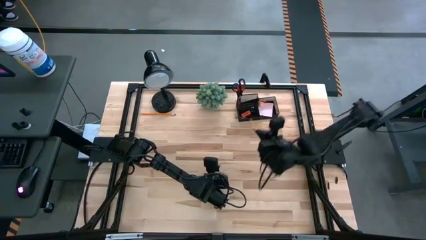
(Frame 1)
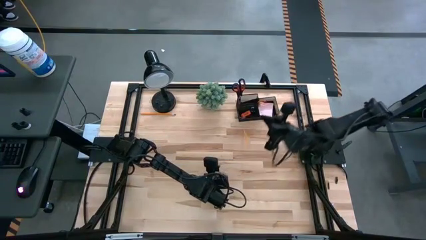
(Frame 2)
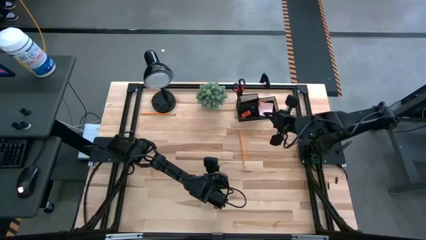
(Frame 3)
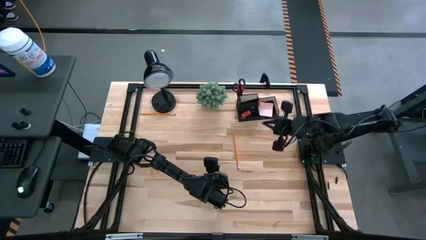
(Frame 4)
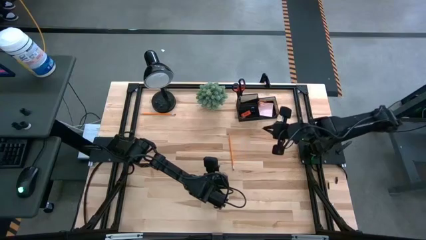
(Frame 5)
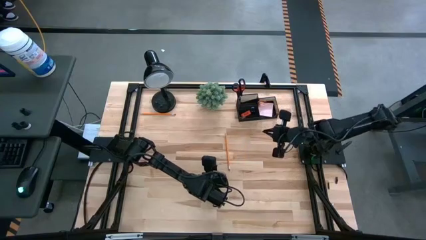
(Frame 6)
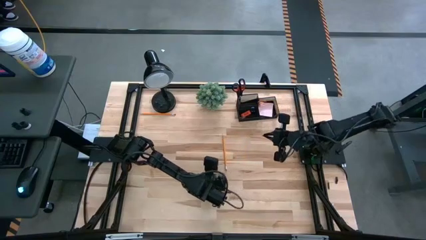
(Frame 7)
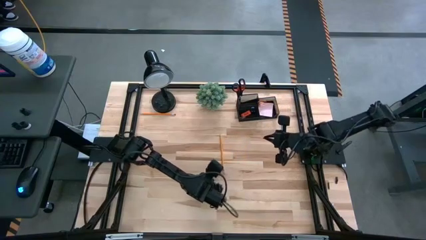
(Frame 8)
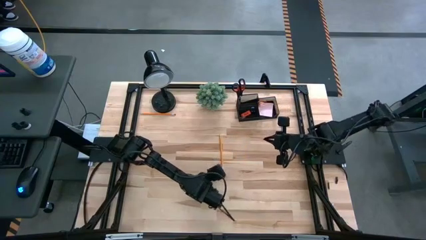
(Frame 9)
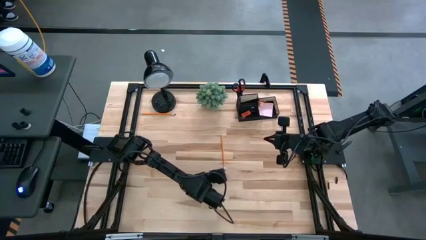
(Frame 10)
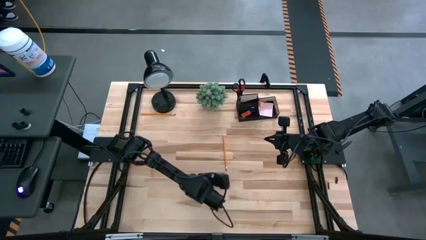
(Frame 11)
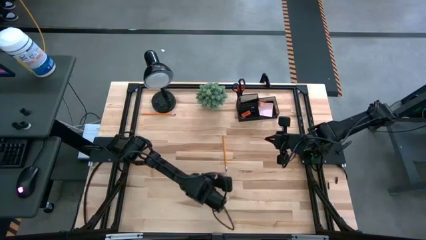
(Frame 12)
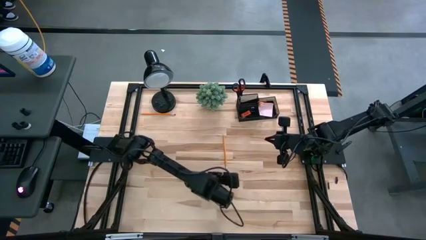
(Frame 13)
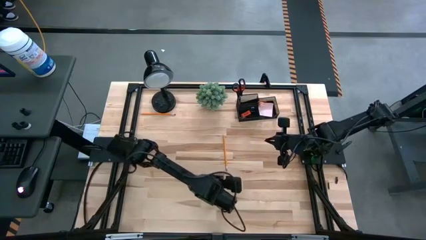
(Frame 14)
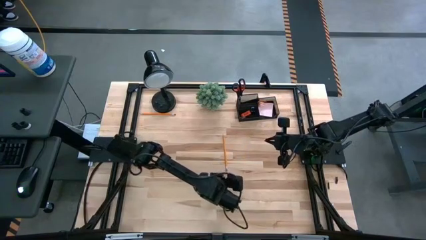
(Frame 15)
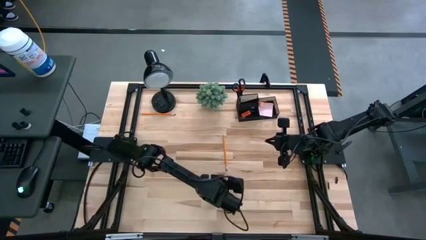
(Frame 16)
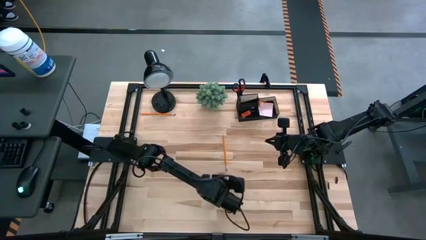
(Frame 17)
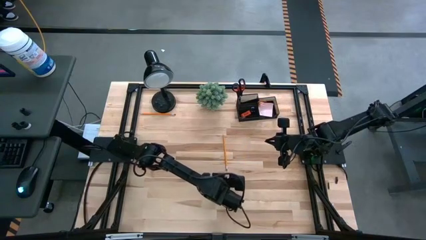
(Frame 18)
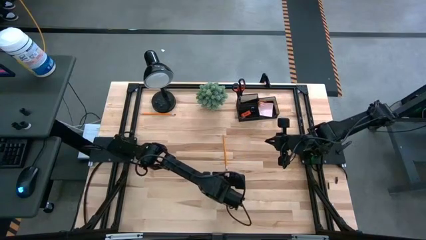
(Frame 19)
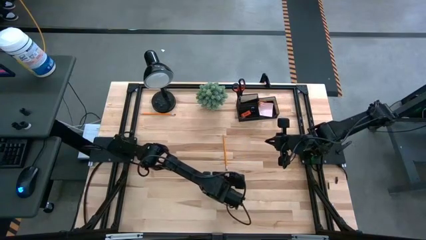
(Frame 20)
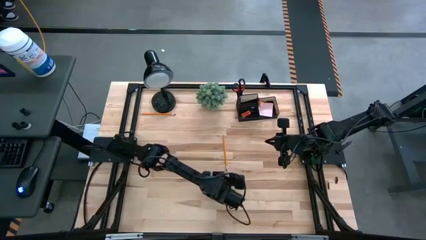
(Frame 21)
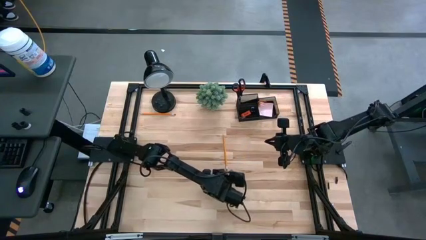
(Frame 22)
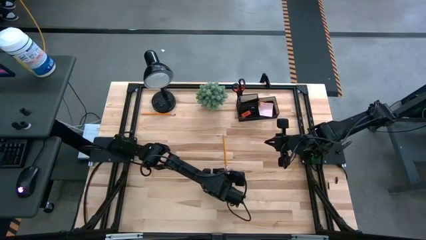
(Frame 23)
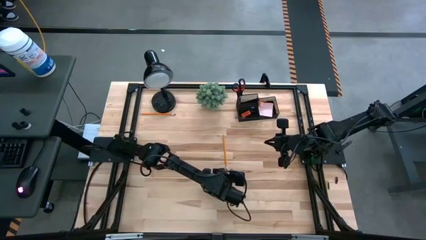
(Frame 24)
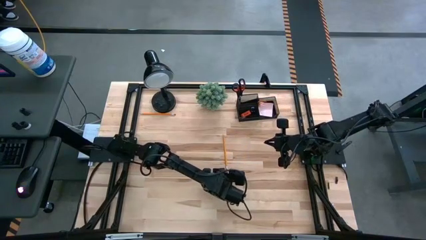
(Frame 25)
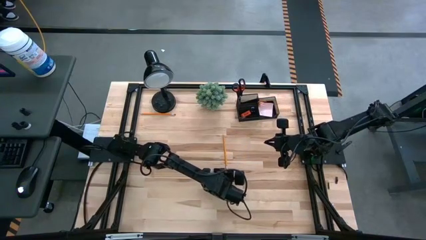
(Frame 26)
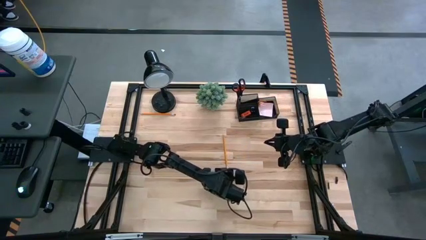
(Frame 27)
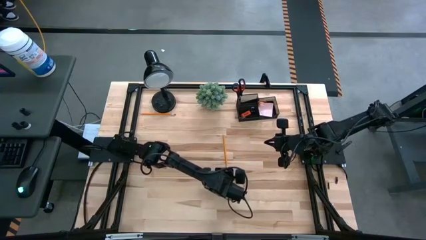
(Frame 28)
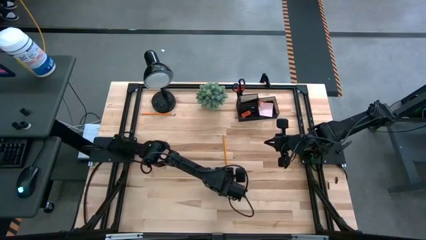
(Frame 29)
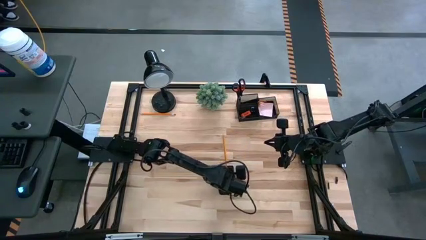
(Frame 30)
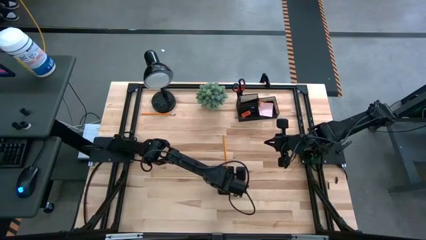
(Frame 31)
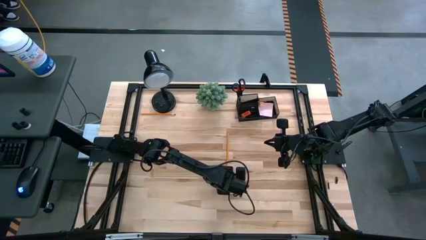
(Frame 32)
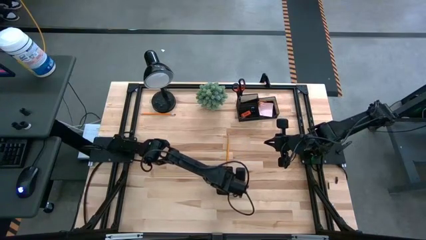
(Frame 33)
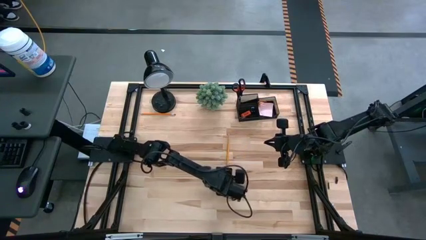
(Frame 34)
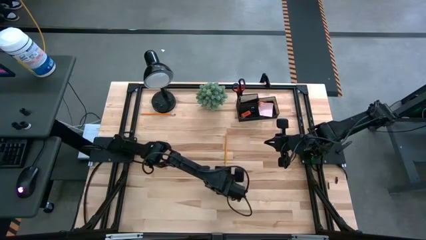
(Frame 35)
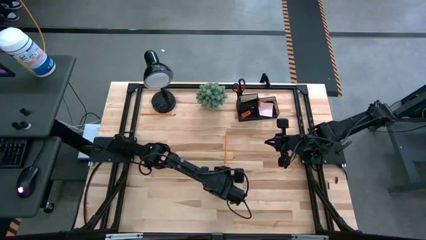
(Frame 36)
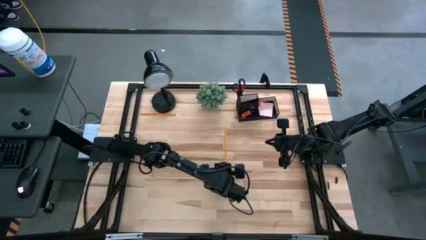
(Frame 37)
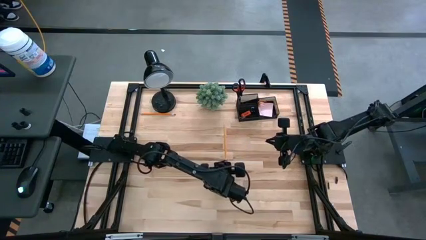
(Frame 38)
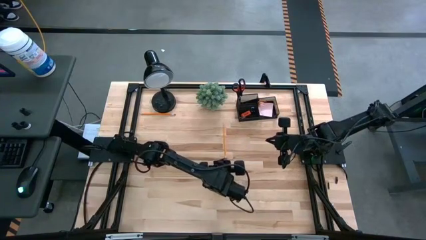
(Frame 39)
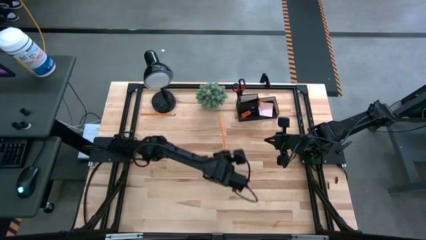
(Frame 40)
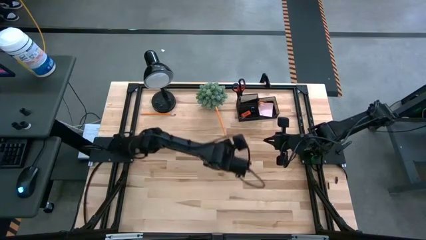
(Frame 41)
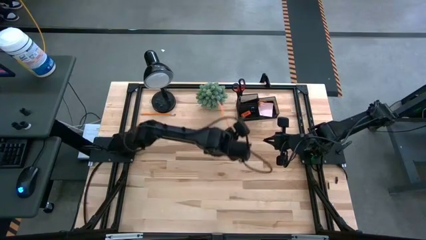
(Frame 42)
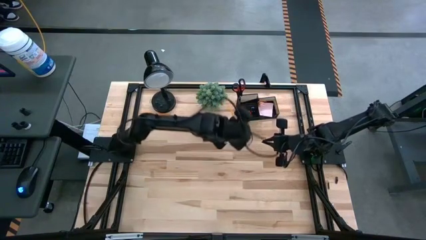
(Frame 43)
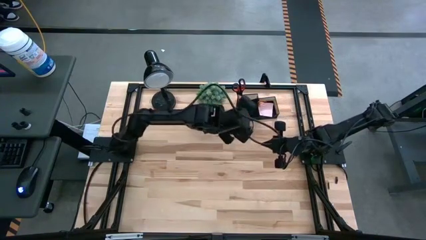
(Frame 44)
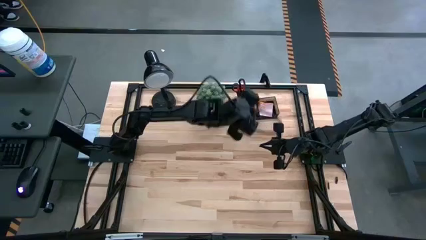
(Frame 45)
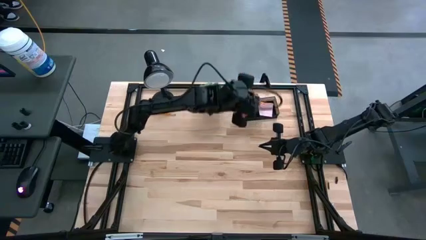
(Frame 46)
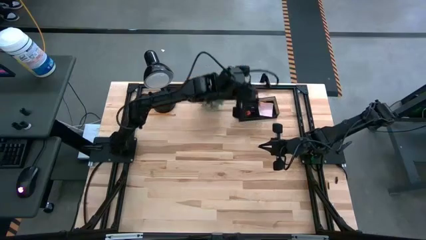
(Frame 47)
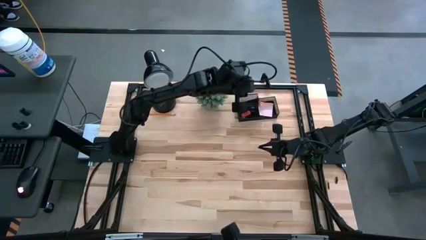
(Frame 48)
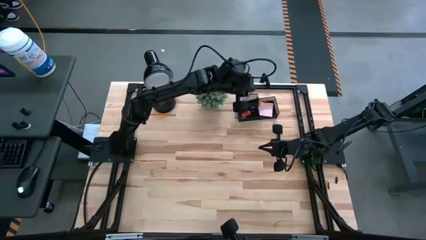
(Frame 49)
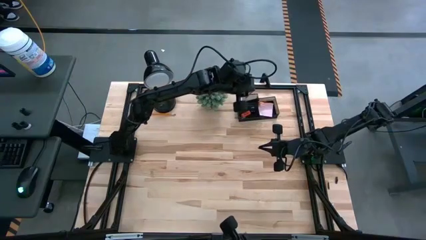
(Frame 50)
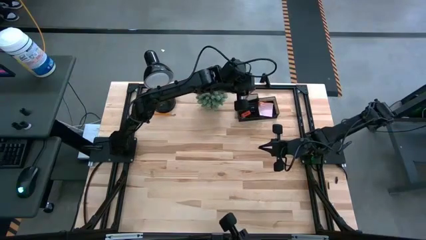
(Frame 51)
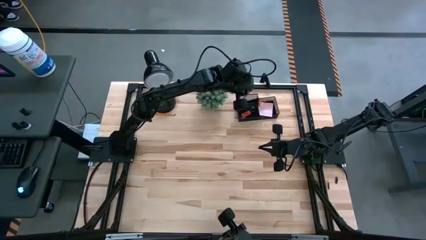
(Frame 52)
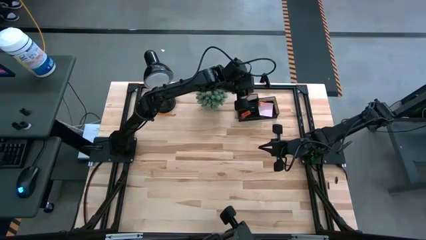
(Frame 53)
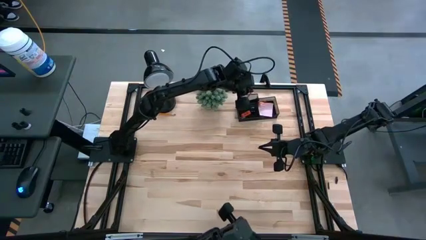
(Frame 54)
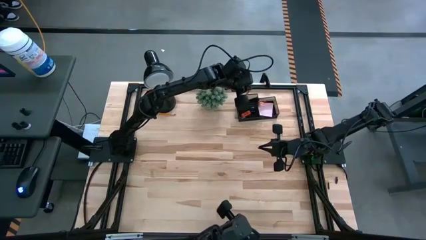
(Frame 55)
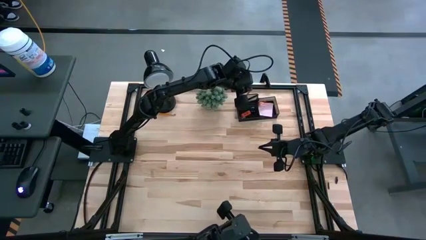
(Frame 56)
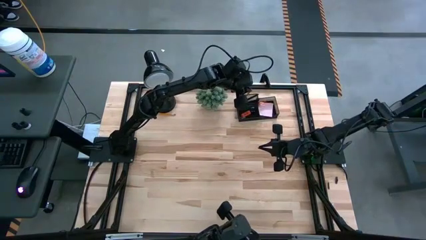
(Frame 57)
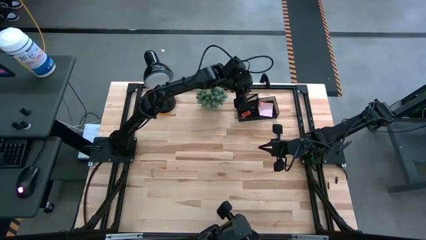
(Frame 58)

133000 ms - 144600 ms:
Task: Pick and place office supplies into organizer
Put the bottom orange pencil into the black desk organizer
